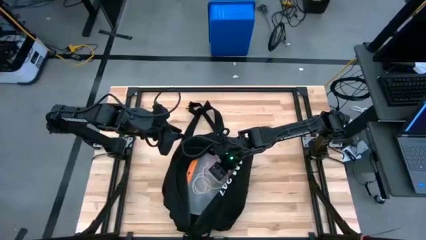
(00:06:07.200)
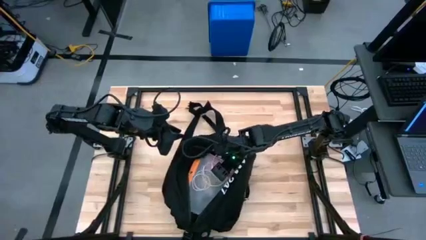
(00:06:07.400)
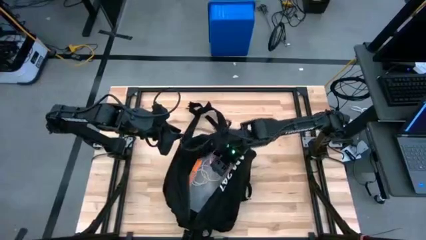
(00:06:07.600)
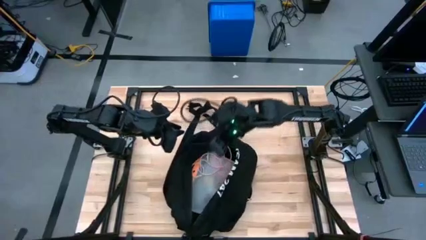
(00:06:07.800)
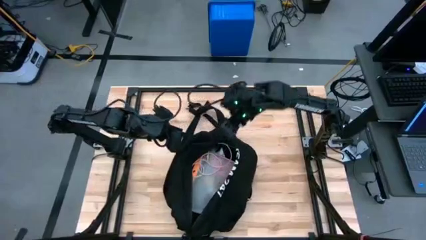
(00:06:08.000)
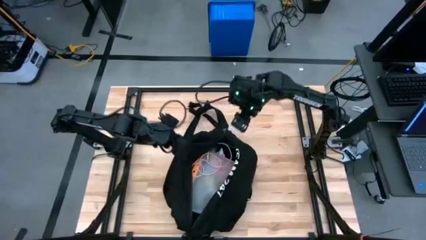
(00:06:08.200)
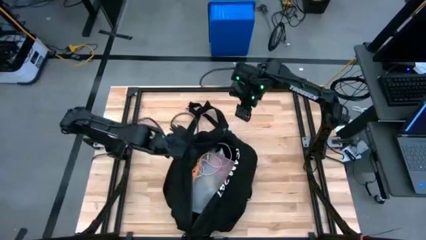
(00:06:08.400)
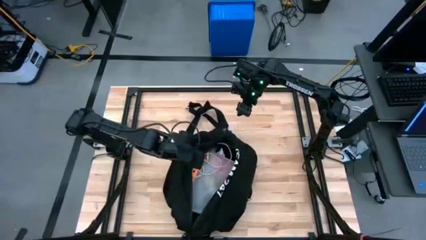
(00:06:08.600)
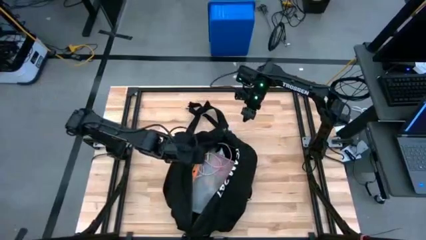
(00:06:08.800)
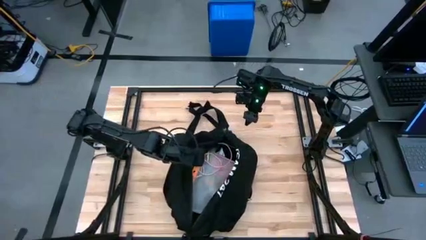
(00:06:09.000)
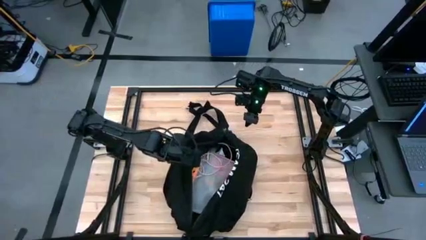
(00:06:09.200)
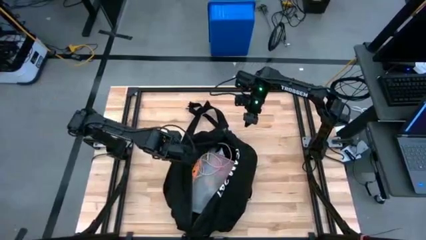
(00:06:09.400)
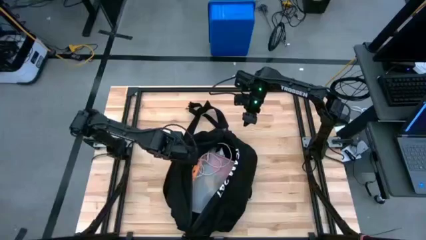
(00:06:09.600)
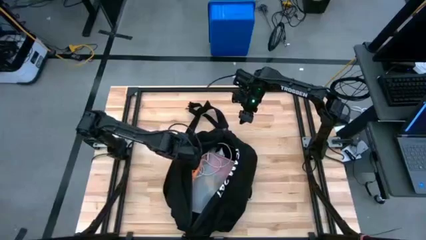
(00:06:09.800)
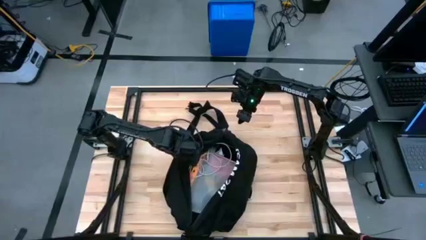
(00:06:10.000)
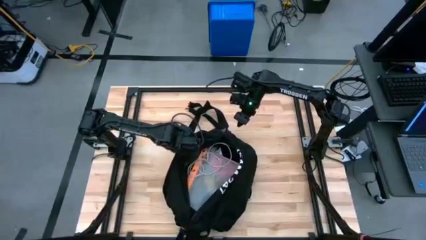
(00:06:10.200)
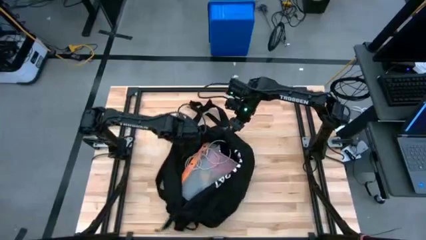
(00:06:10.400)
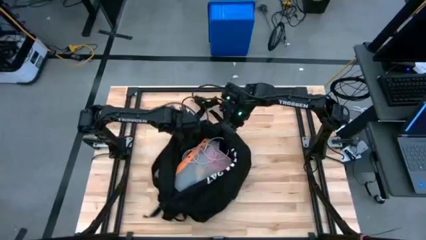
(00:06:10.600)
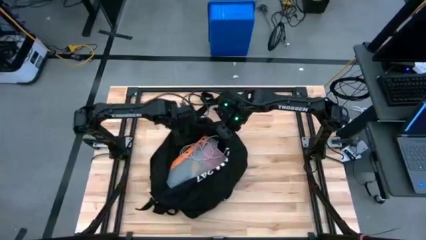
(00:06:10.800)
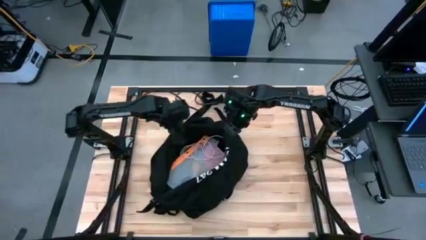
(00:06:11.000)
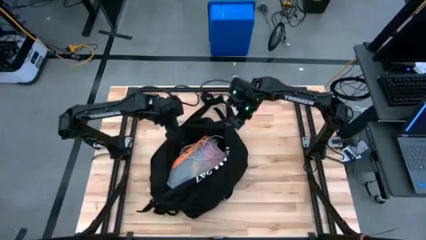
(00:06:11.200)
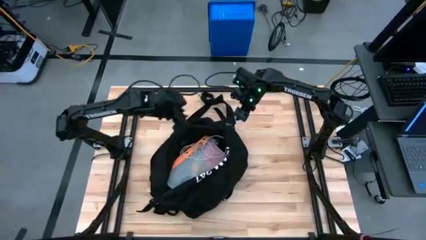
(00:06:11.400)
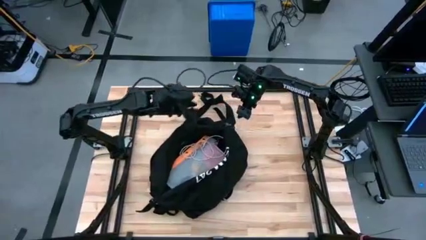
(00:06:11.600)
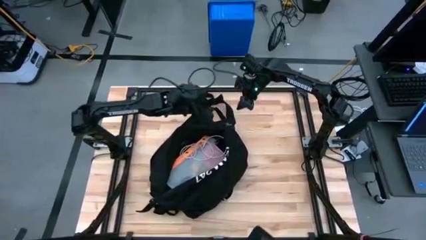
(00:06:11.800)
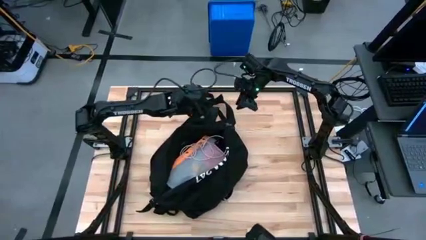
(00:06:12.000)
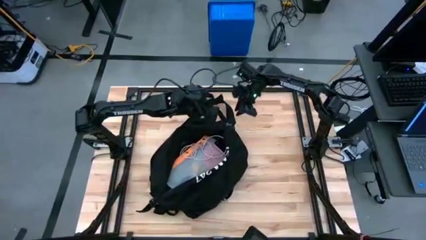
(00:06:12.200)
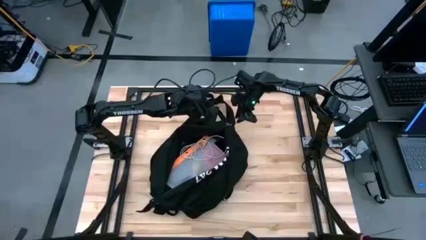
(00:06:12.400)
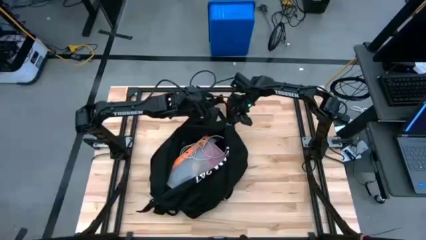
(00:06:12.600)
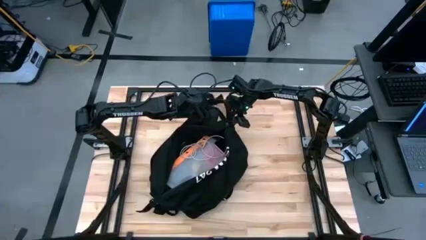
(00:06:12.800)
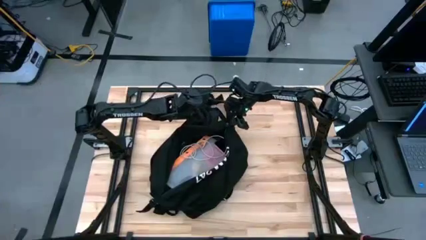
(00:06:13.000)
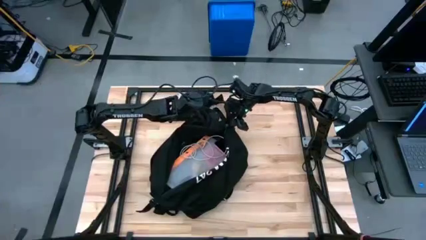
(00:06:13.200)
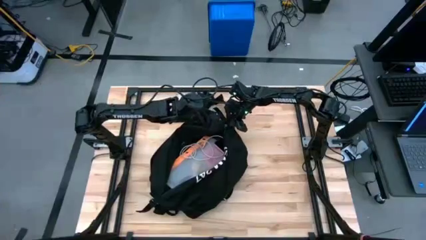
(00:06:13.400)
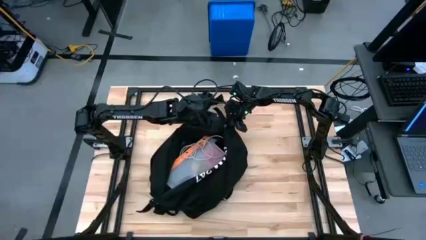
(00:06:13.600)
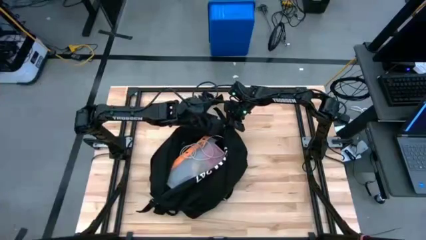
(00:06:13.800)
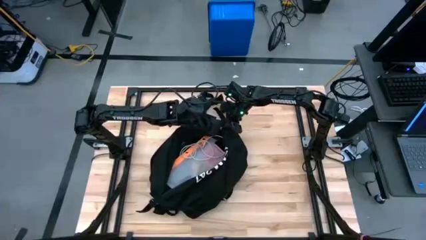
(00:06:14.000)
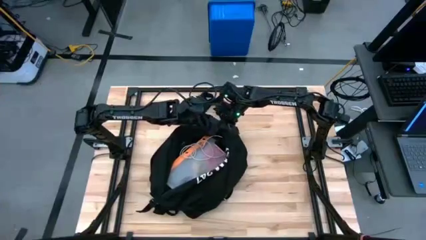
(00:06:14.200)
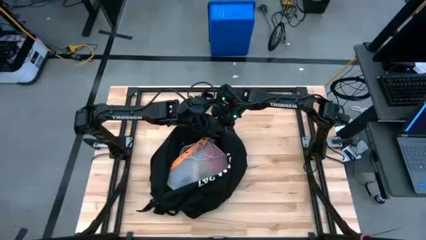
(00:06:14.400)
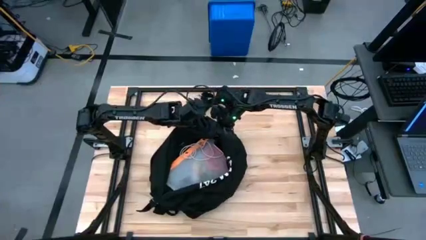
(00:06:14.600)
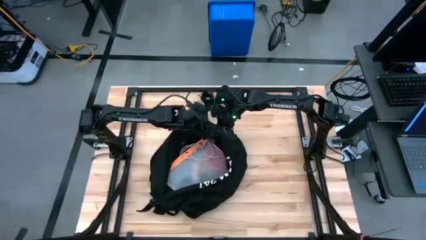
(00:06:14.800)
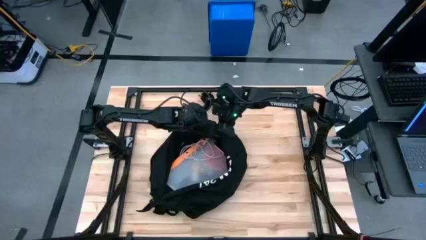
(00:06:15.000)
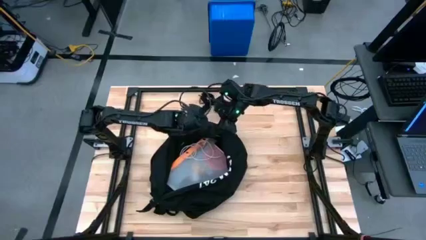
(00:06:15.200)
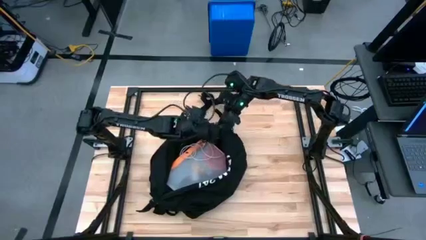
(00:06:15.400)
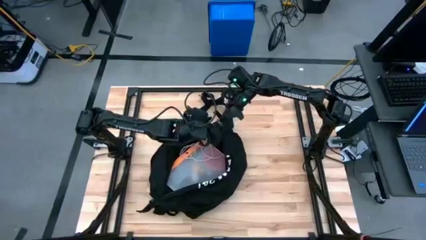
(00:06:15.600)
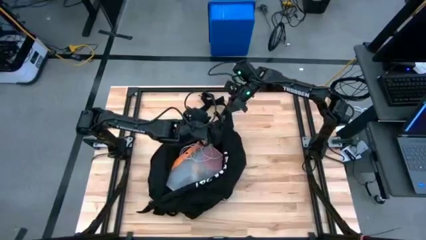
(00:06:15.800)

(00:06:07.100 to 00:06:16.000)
Task: Unpack backpack
Close the black backpack

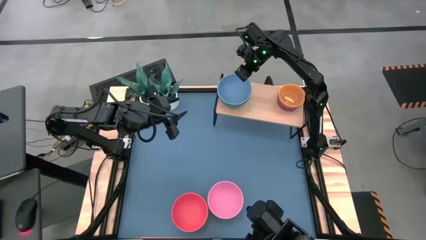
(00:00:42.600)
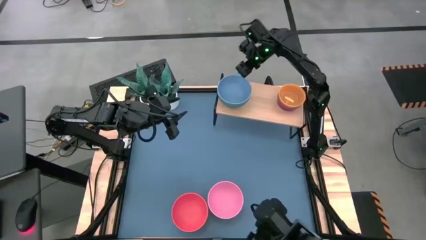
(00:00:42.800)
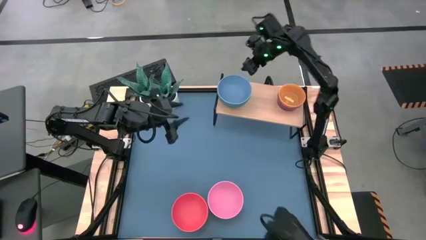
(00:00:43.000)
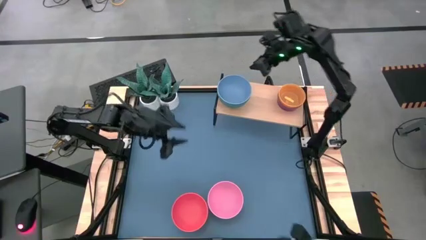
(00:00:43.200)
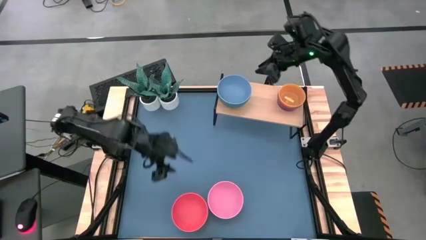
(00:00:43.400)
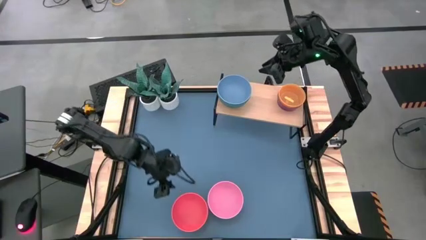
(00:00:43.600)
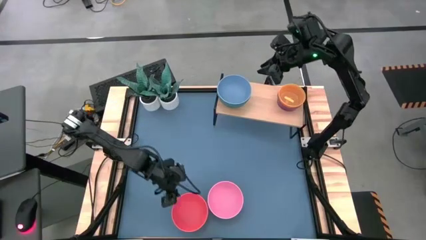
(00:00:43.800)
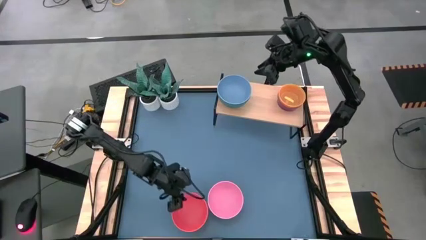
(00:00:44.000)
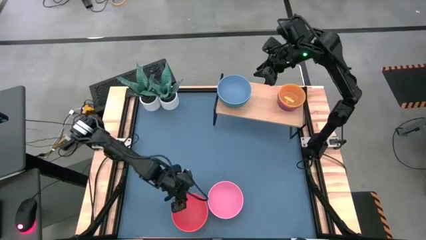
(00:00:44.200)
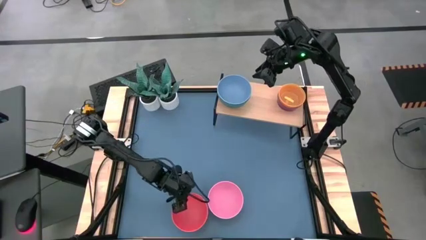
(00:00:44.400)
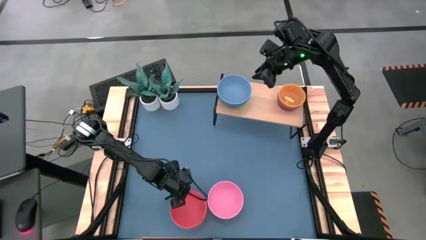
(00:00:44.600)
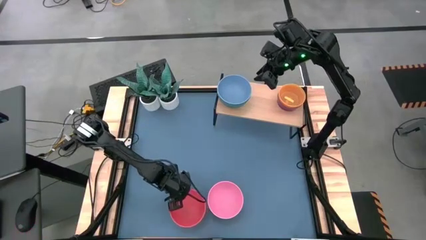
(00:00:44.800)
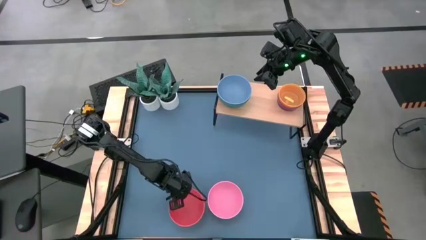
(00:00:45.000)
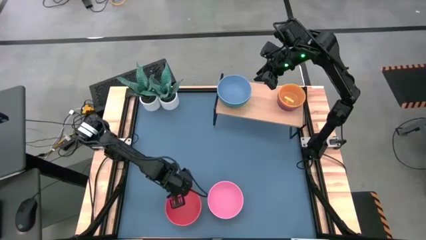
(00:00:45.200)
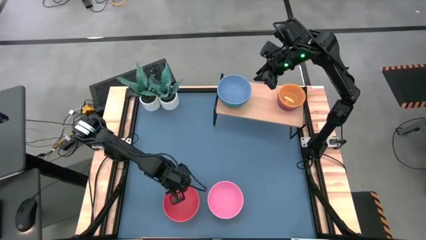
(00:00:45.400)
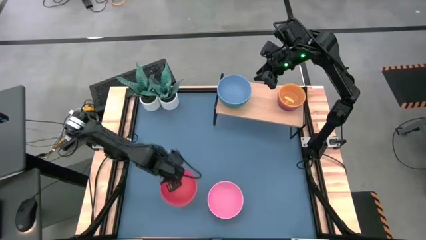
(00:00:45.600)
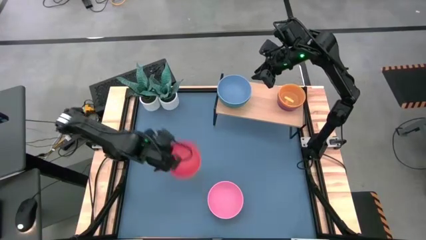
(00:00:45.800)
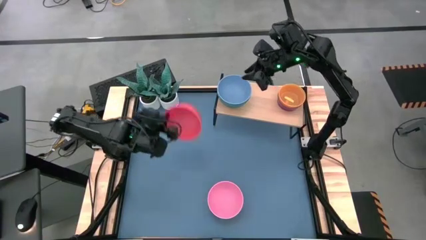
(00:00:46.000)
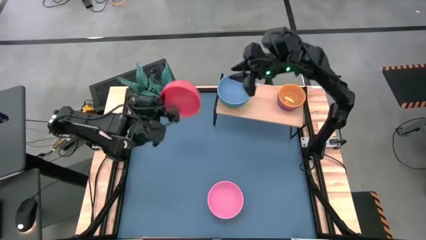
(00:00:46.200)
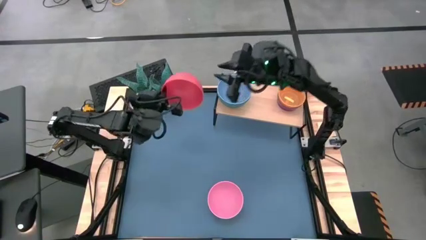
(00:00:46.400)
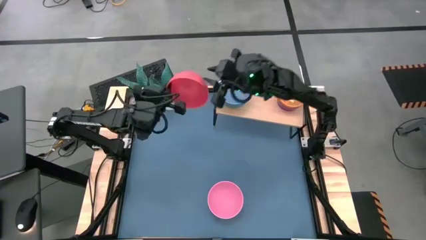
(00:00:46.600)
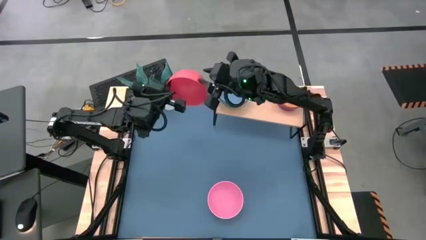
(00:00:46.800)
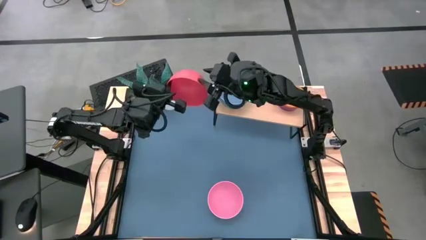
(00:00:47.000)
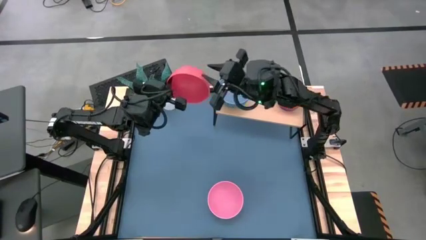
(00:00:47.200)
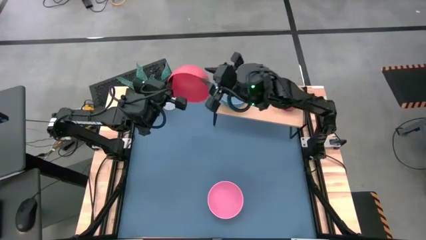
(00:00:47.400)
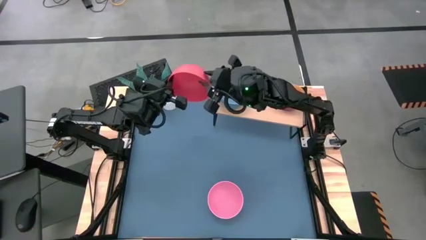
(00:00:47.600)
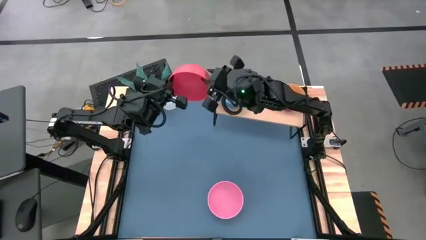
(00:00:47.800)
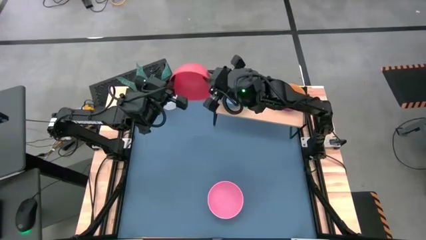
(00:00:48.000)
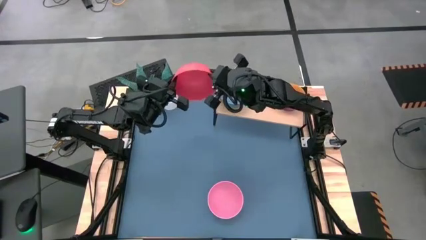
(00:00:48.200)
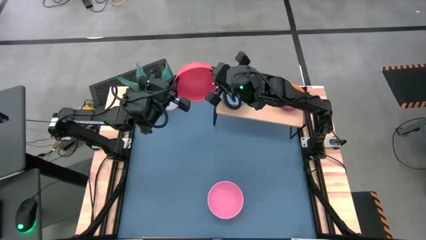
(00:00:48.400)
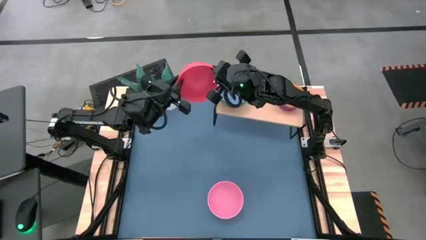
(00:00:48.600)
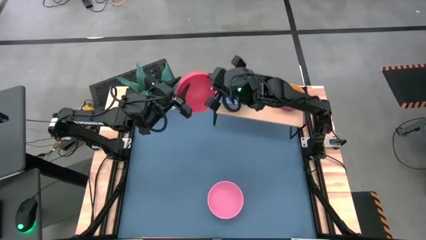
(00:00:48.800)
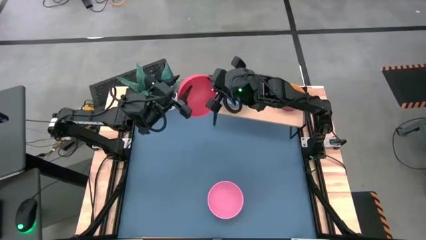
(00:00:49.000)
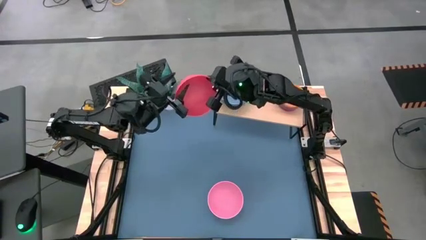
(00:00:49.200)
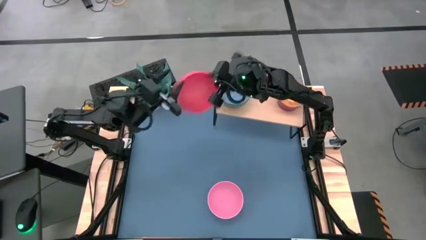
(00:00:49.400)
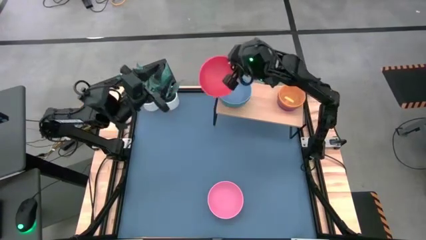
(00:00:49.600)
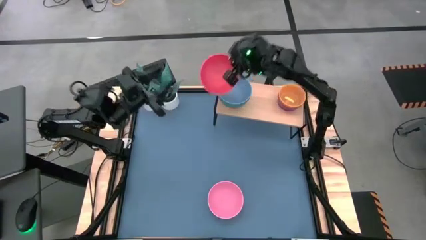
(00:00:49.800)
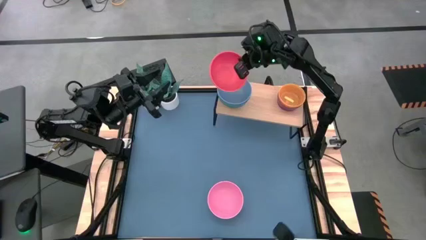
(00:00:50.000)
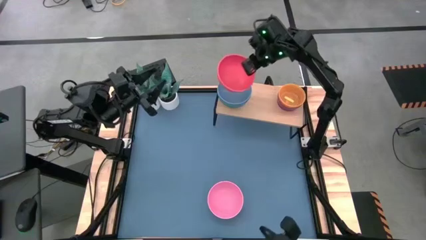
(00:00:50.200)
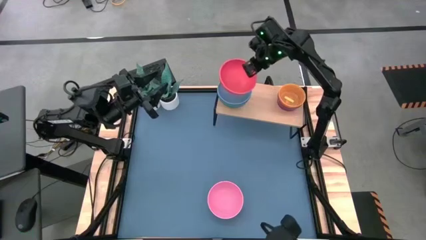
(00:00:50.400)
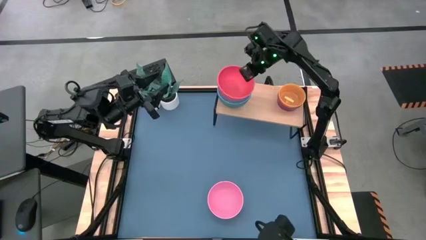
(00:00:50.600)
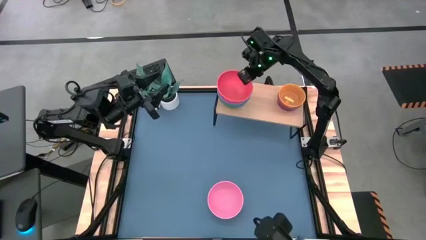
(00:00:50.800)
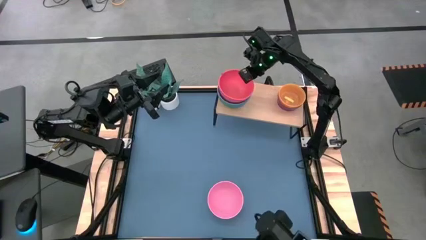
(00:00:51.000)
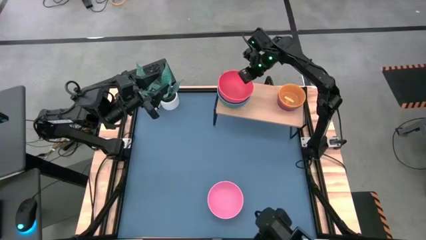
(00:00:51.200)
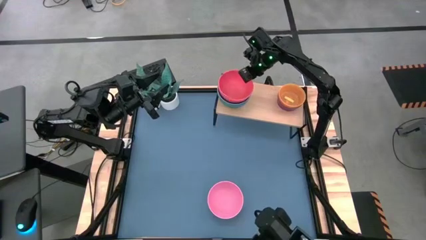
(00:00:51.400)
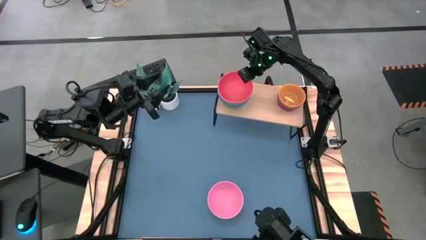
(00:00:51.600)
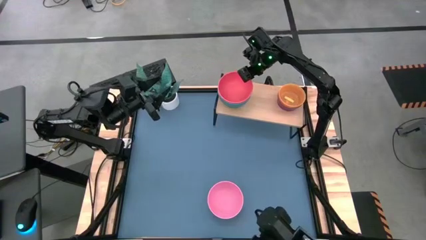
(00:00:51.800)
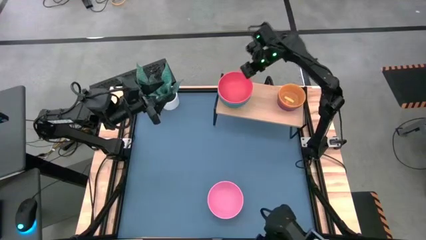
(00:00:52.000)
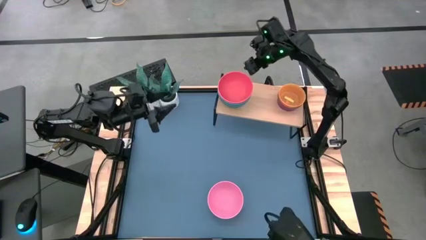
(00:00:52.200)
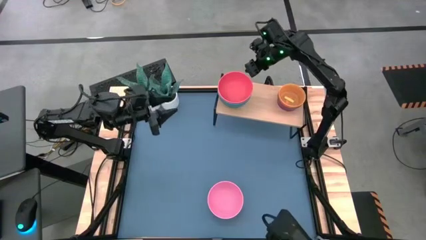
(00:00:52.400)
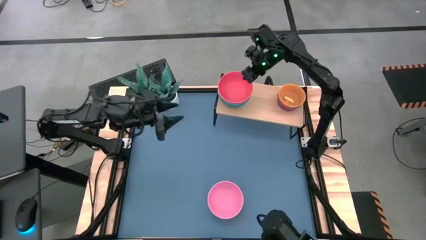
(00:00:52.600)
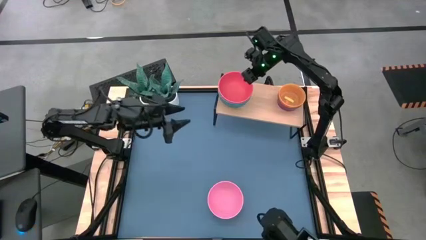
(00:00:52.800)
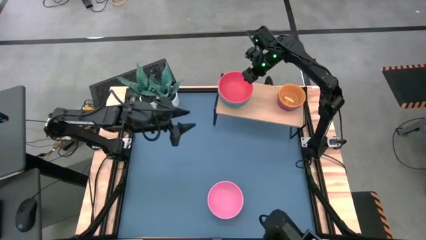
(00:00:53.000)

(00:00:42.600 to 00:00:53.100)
Task: Place and stack bowls onto a shelf
Stack the big red bowl on top of the big blue bowl on the shelf
